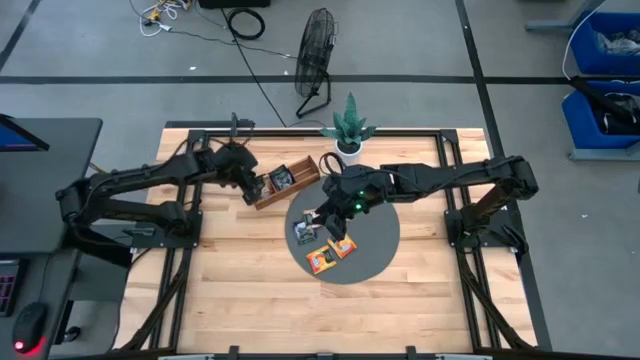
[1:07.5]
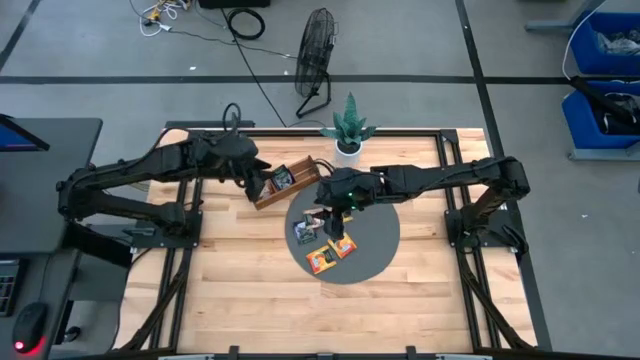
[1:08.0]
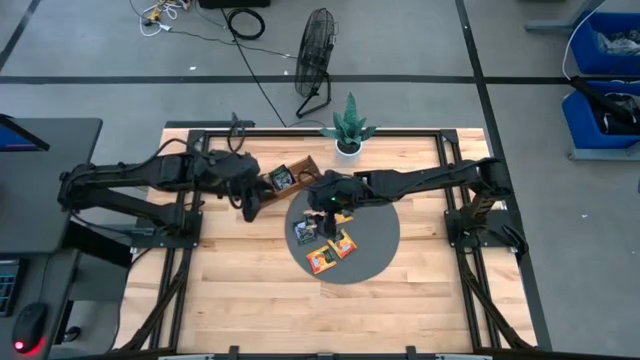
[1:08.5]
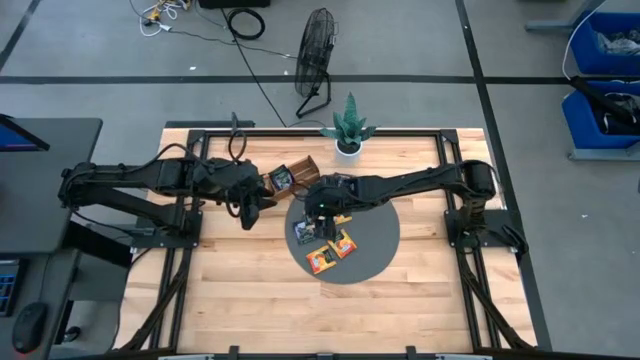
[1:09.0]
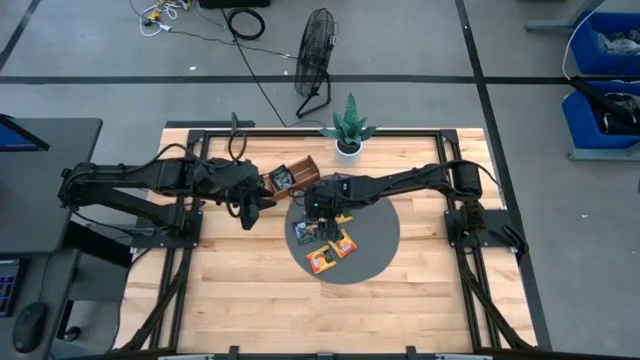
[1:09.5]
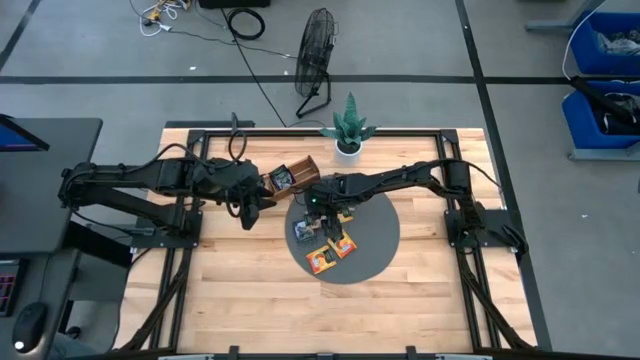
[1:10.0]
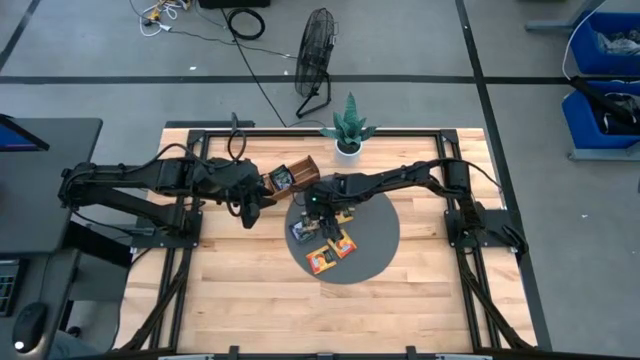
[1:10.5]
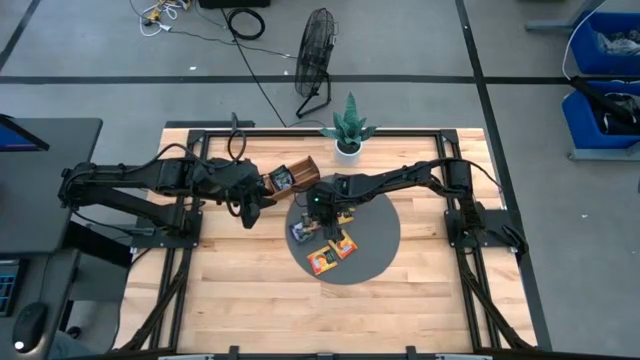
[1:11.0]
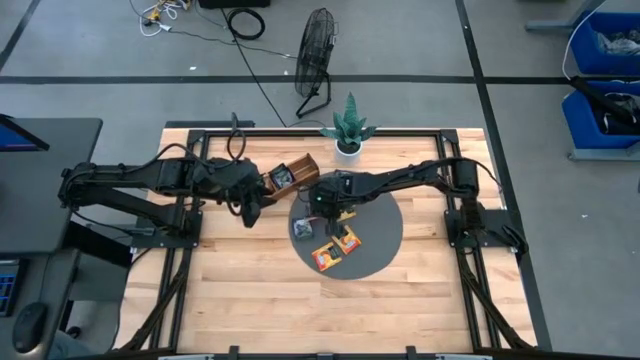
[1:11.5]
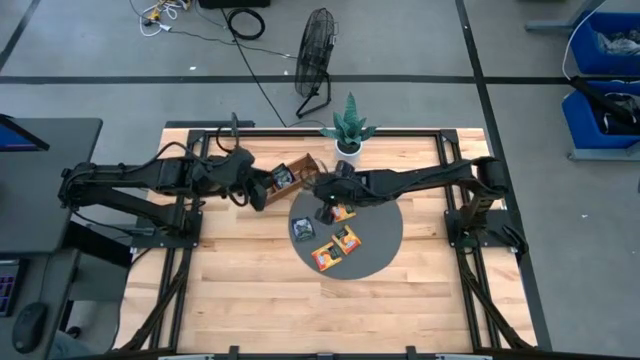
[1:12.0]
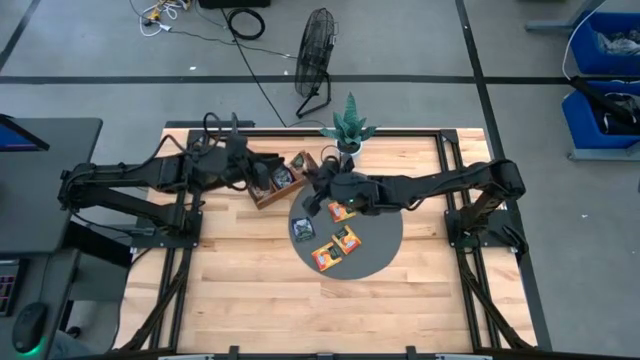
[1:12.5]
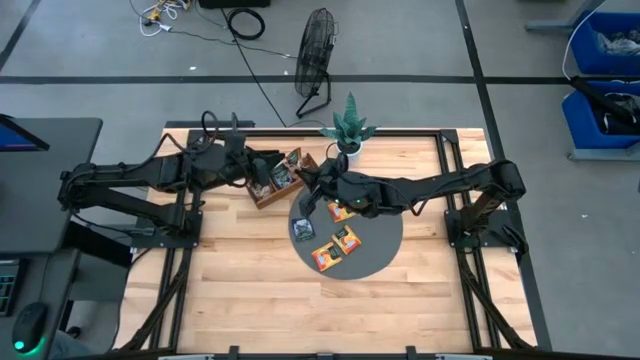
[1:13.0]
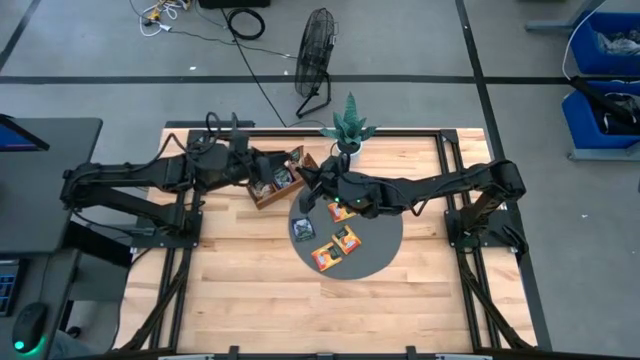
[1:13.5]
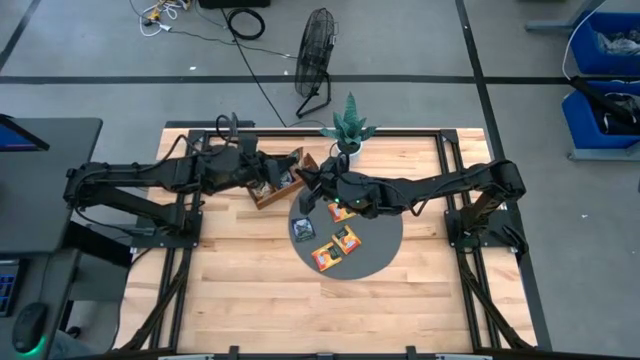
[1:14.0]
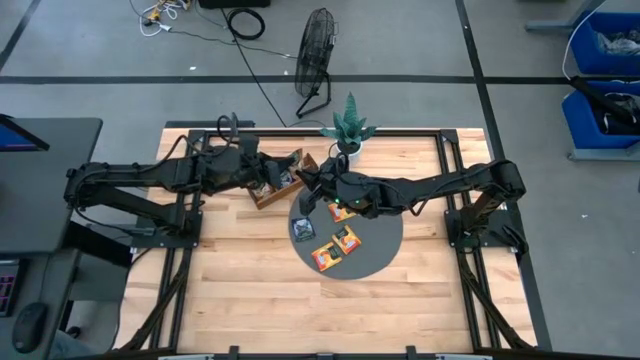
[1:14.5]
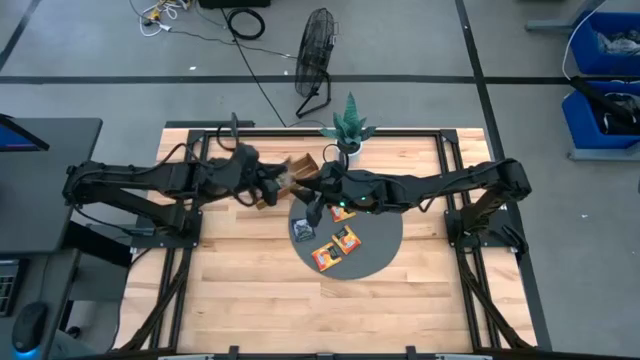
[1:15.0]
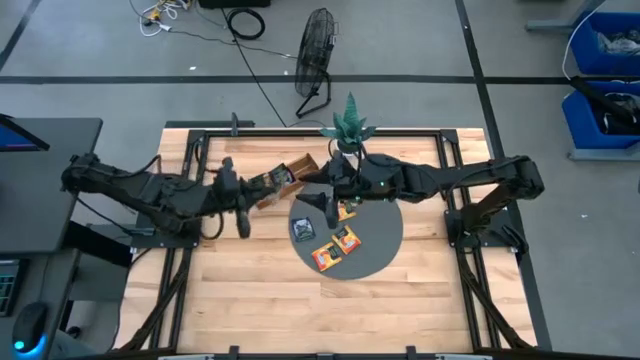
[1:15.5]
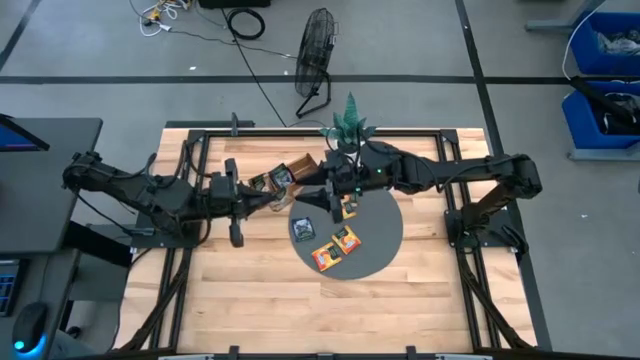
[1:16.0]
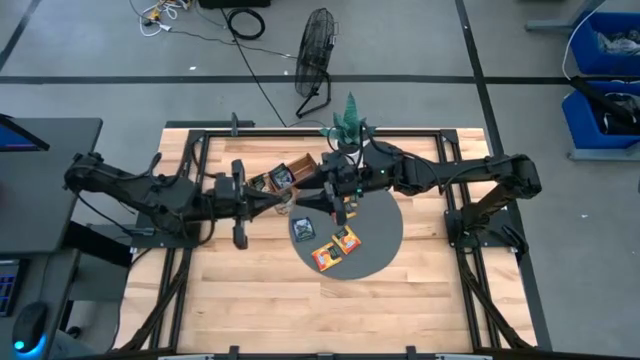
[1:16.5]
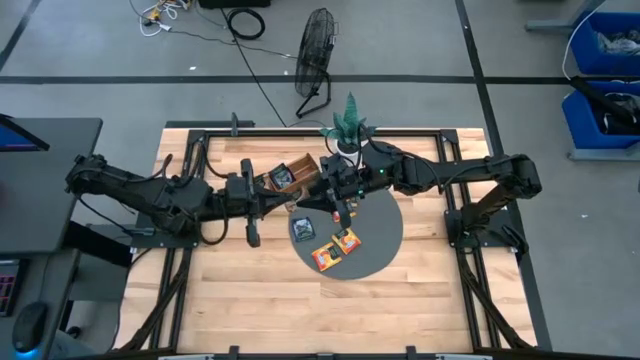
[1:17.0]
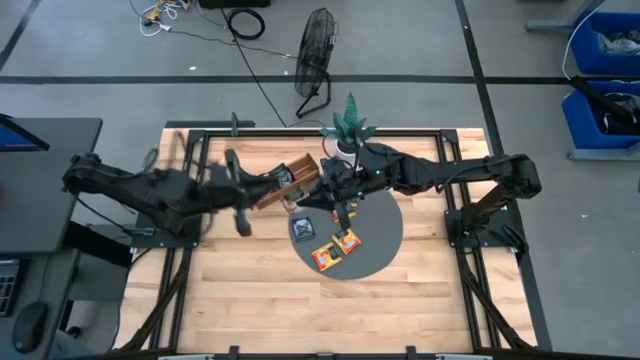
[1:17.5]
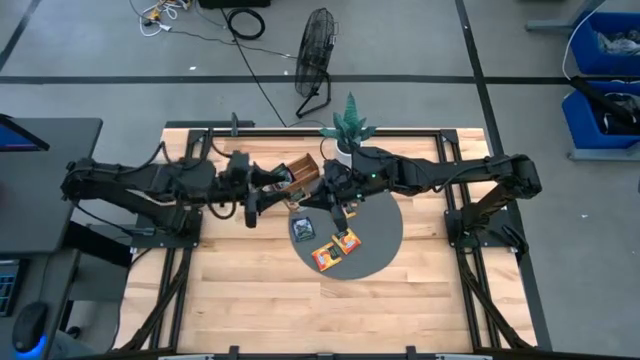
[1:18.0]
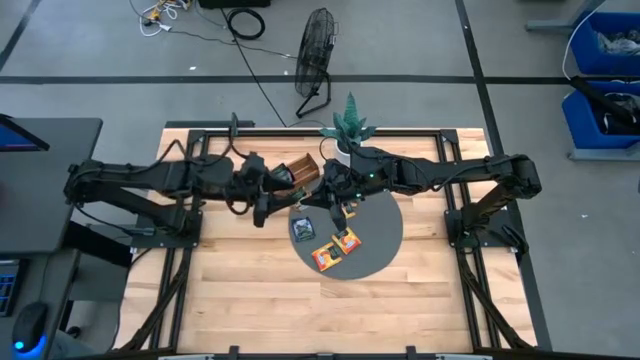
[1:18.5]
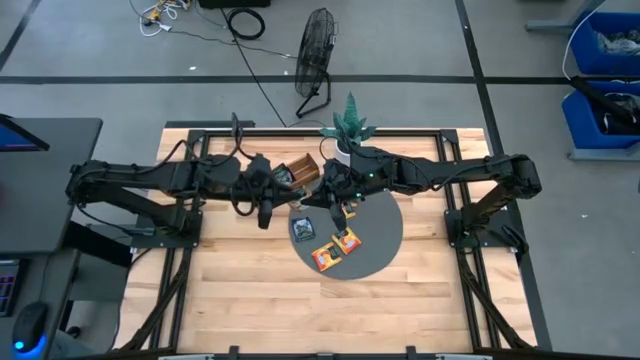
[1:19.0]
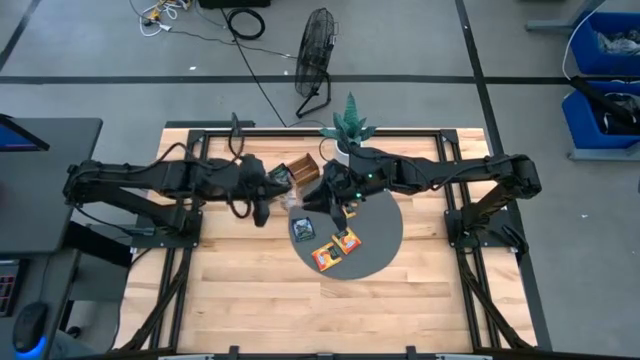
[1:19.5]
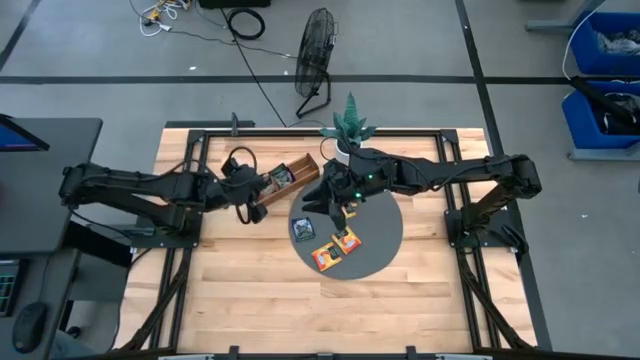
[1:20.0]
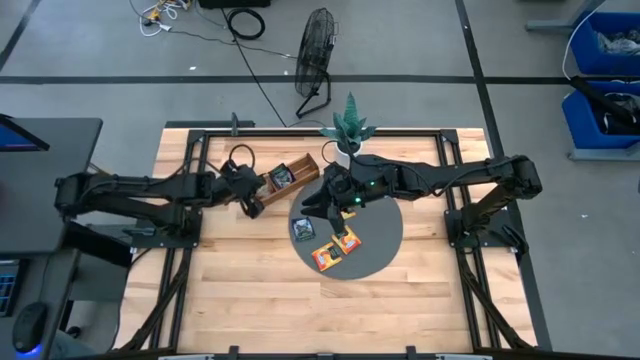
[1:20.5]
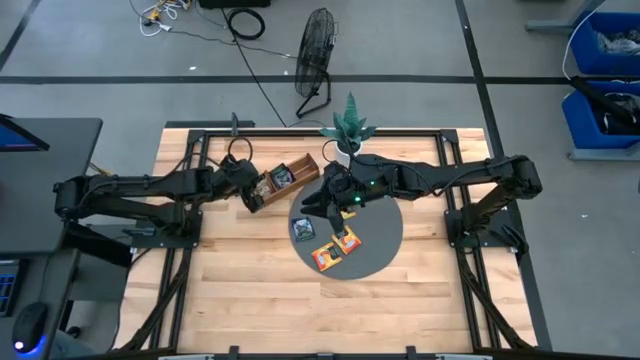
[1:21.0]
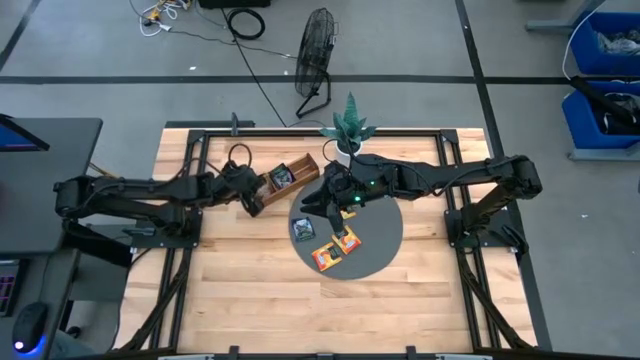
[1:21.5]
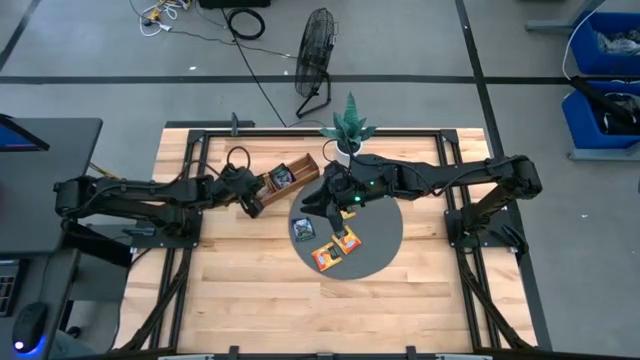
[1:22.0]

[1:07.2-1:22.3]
Task: Pick & Place Tea
Put the brown tea bag into the left section of the wooden organizer

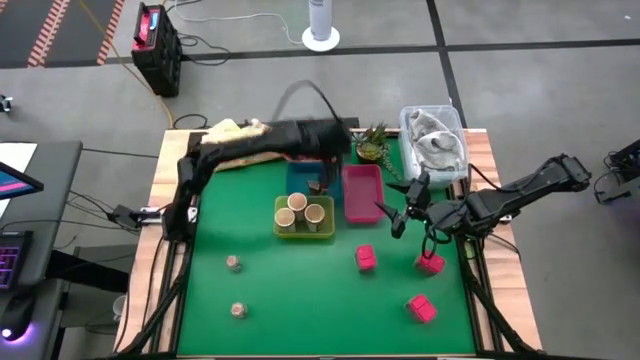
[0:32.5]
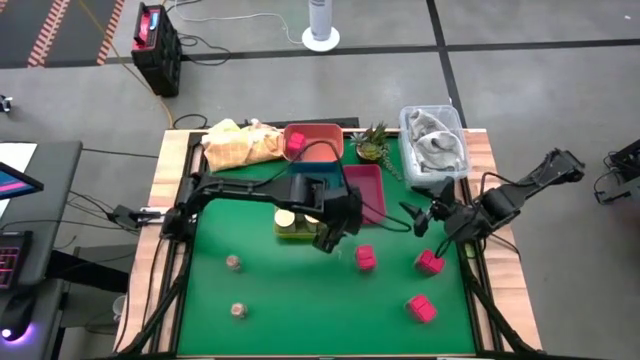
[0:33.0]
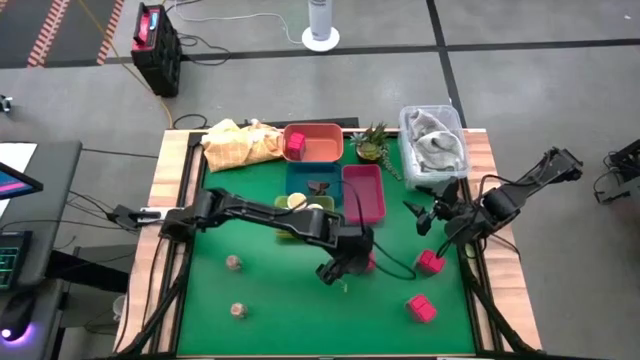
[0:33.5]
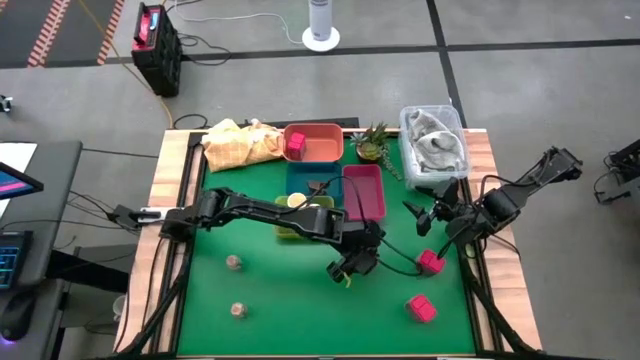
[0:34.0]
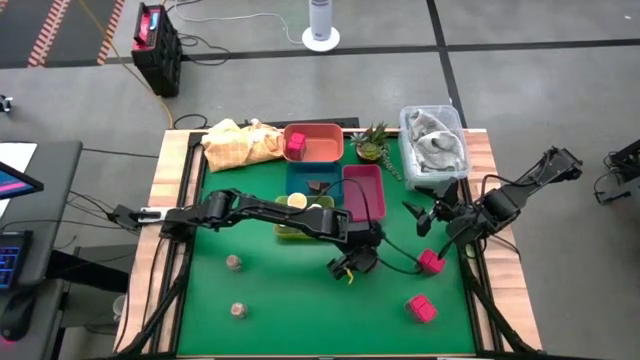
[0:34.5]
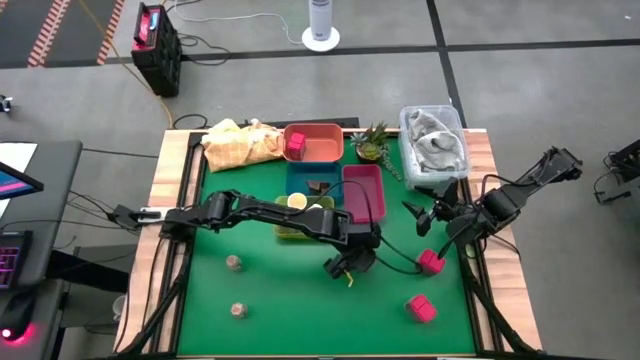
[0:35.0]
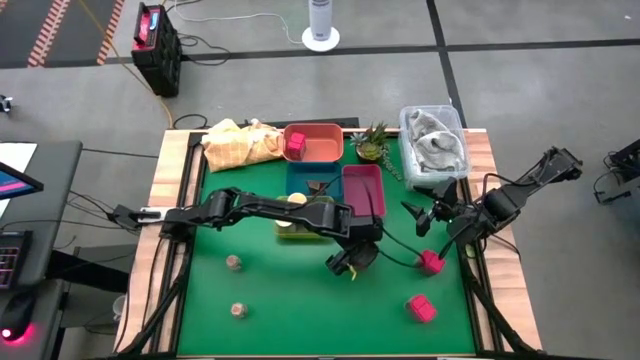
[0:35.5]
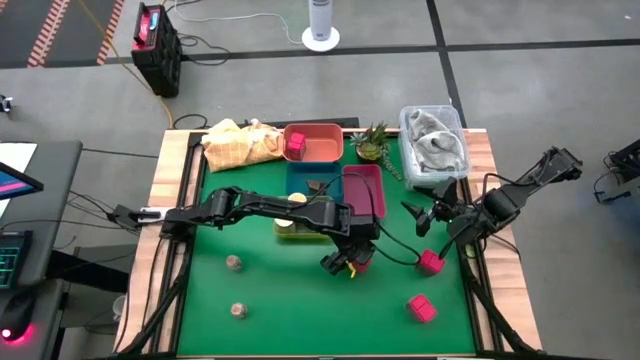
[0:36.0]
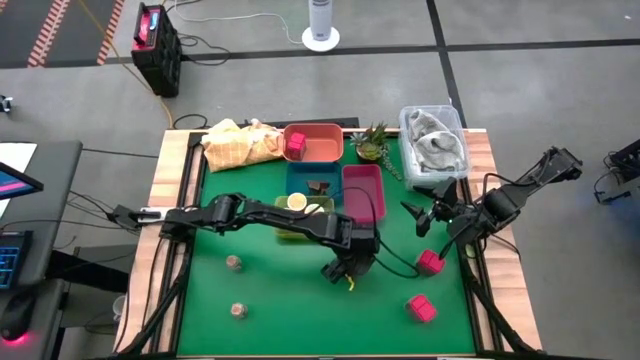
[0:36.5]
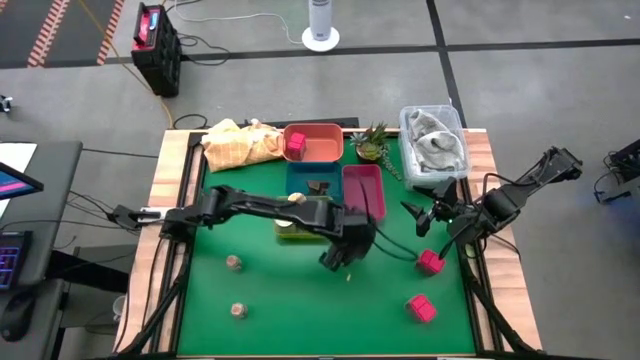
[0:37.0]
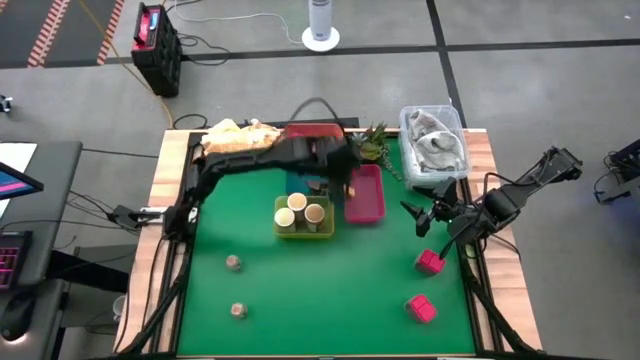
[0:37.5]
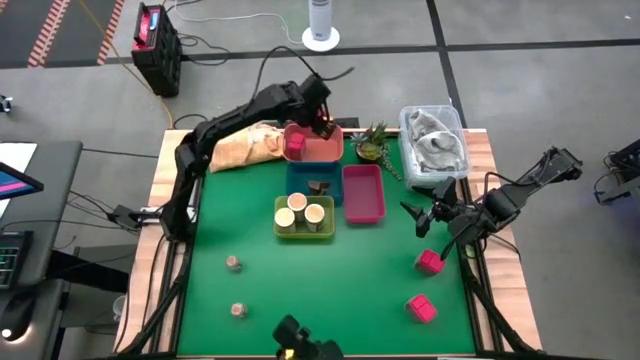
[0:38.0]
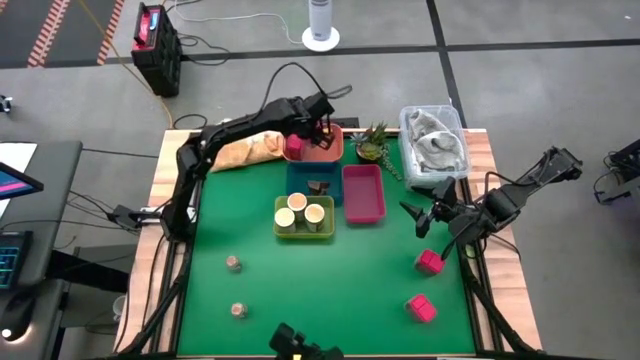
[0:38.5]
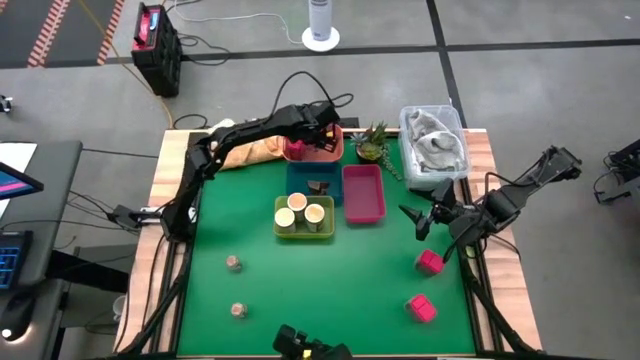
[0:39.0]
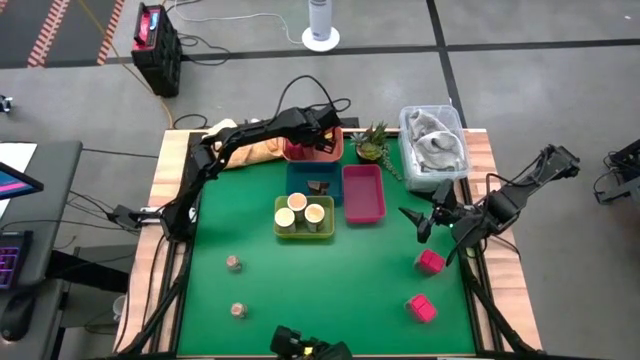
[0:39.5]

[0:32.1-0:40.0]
Task: Sort spices by type
Put the left red seasoning can into the orange bin
